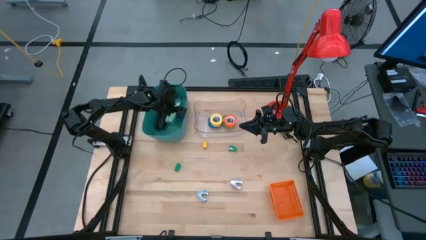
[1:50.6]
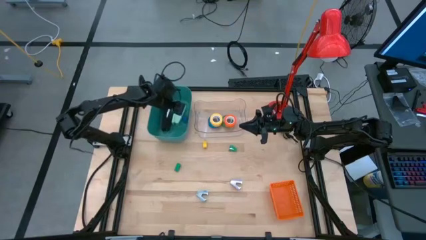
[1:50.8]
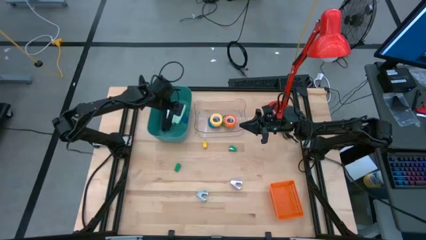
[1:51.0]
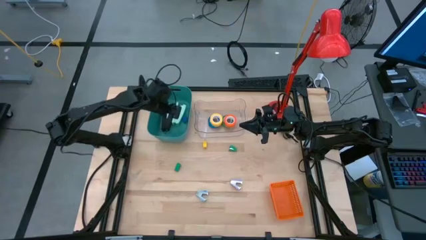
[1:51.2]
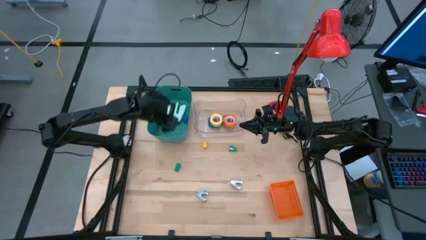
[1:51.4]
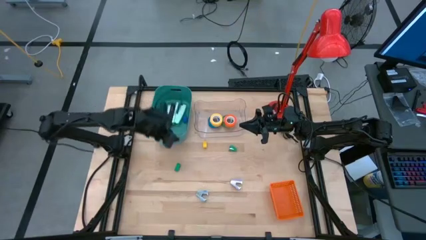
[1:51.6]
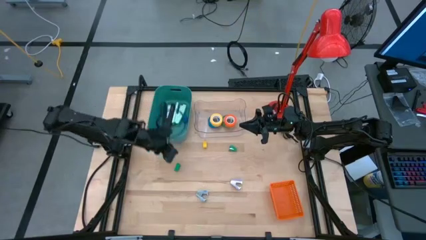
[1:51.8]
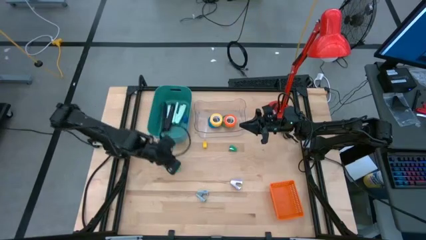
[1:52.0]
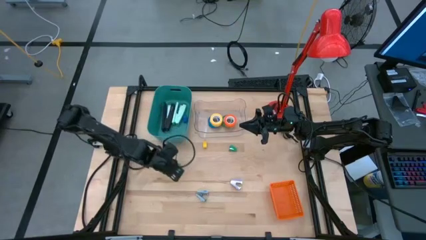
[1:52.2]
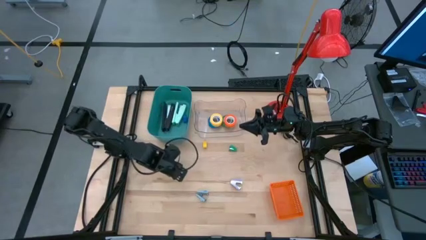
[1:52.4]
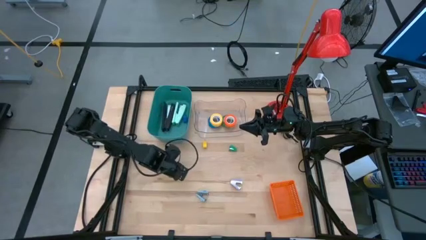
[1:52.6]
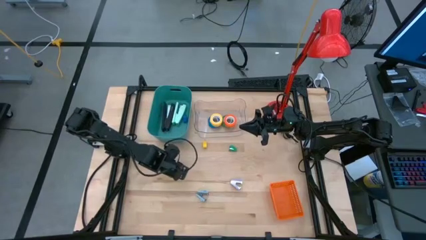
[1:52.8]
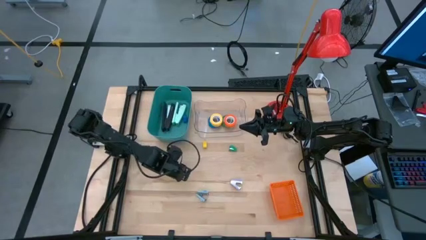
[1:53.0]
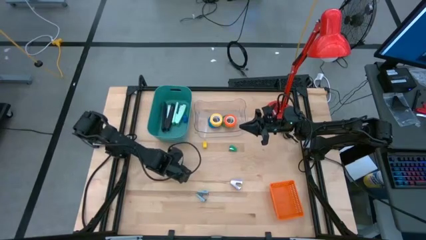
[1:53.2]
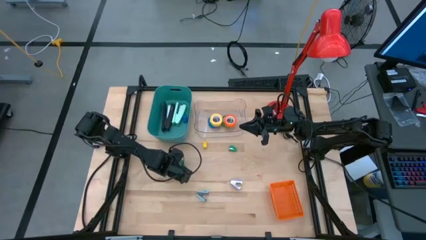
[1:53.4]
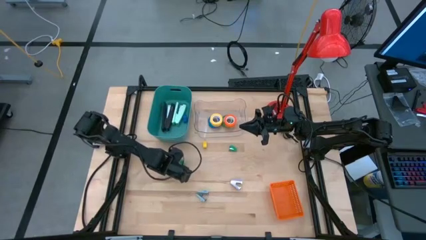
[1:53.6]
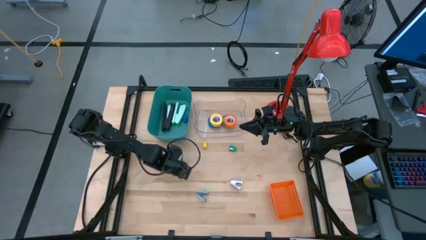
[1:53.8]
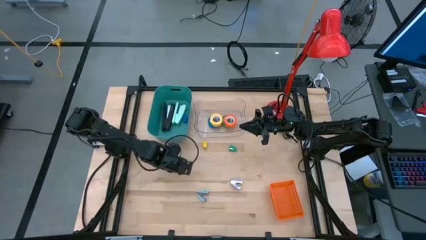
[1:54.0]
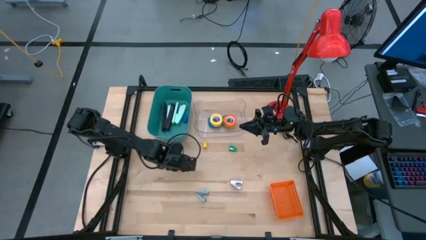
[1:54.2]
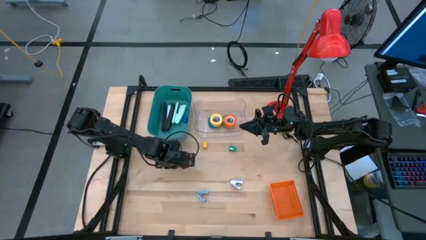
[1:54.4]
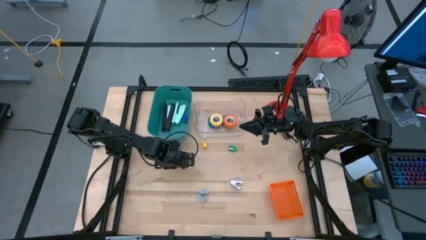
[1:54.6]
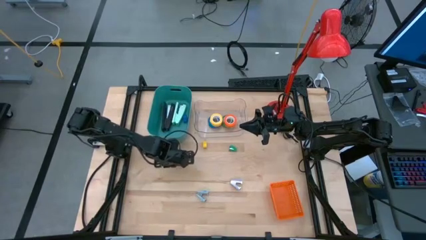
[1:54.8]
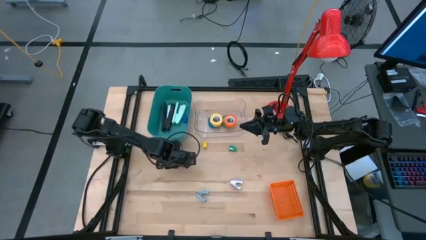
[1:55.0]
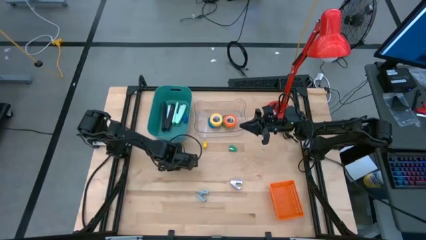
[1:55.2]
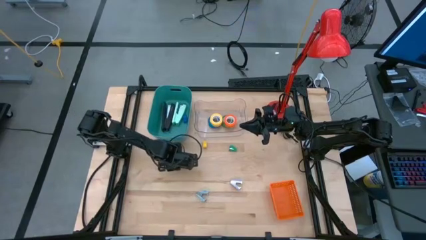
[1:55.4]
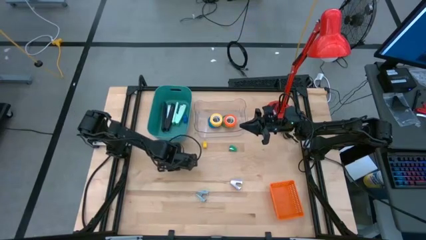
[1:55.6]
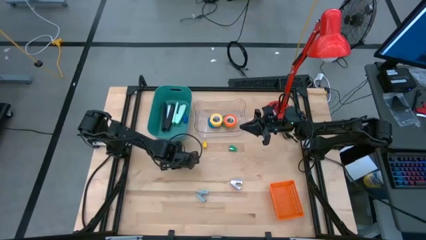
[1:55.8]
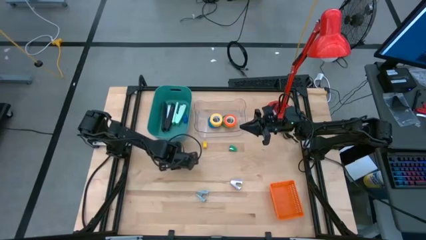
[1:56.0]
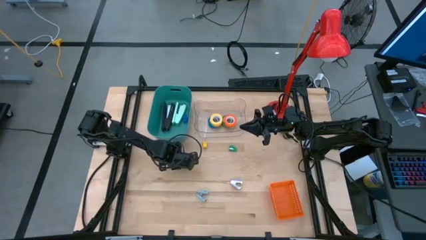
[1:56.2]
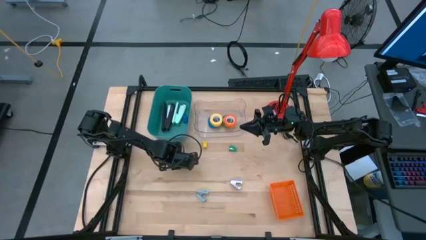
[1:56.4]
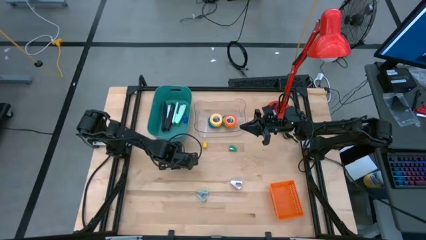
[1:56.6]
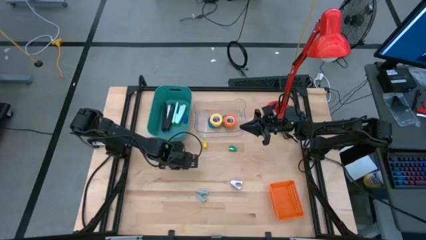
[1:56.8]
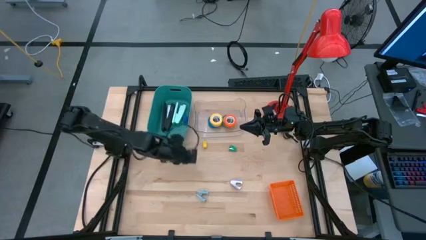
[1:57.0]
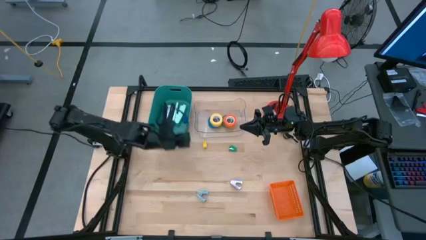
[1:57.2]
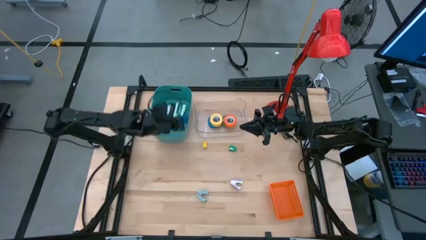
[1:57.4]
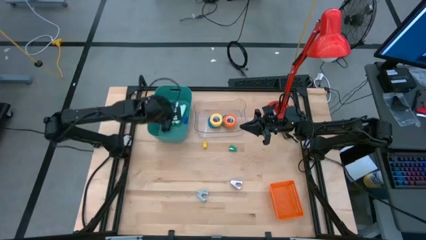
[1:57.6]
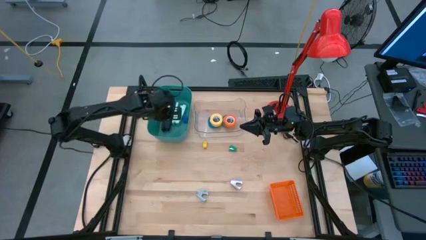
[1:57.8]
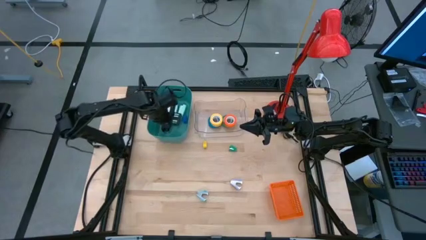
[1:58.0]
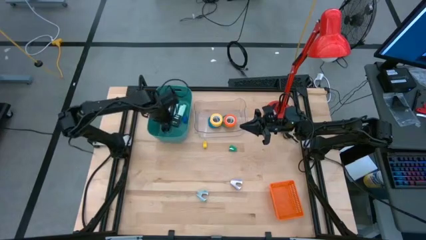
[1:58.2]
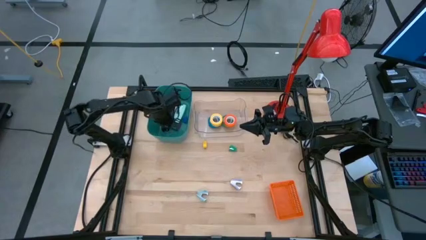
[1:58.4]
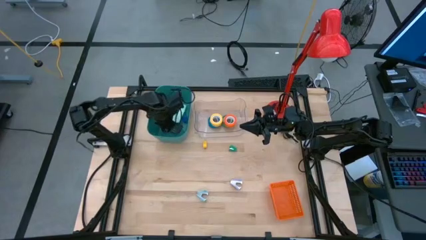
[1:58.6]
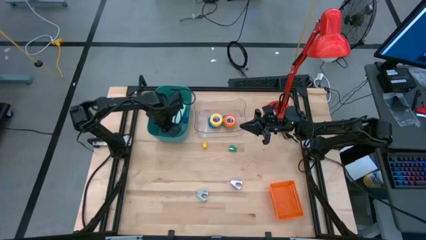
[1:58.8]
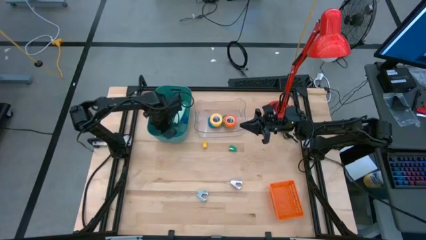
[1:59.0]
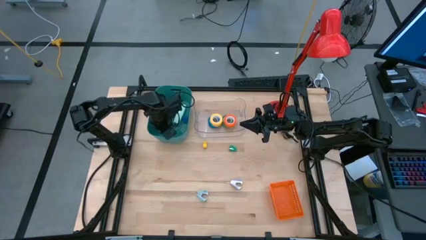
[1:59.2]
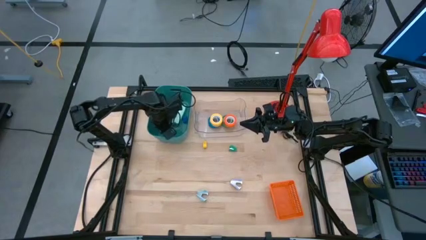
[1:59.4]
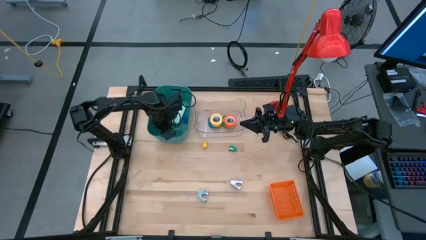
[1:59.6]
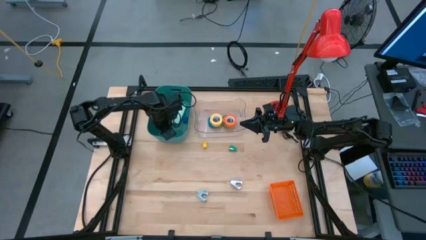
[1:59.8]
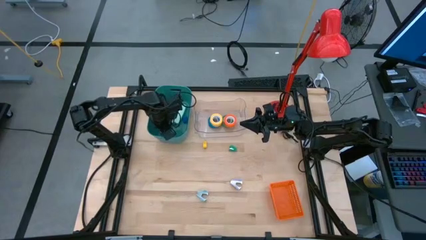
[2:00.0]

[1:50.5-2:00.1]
Task: Pick and place Stapler, Stapler remover, tape
Put the left green stapler remover into the green bin
